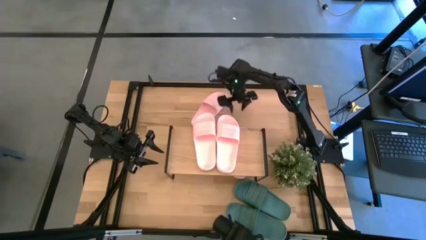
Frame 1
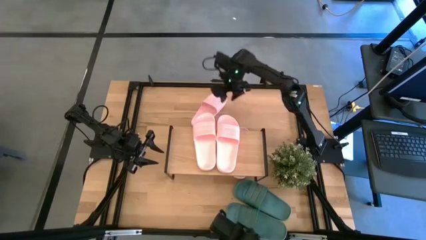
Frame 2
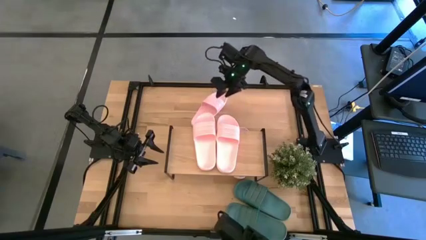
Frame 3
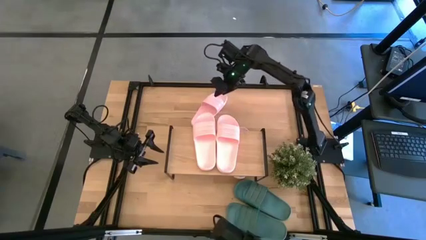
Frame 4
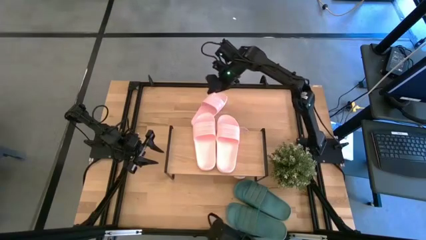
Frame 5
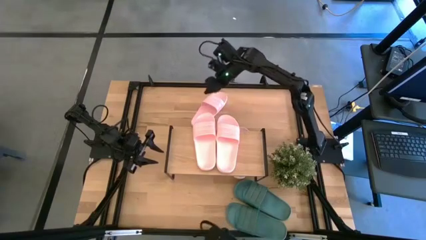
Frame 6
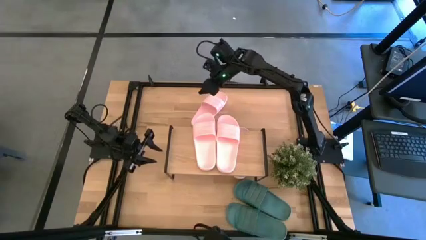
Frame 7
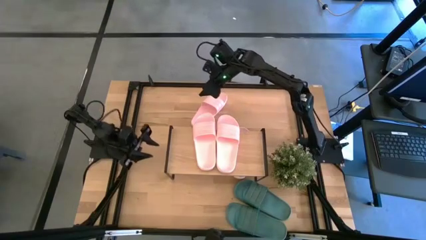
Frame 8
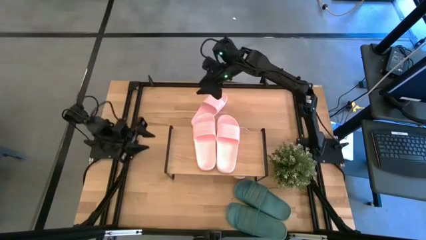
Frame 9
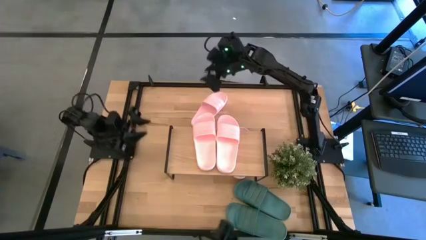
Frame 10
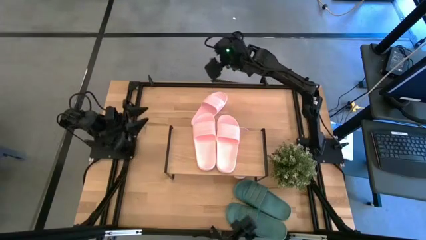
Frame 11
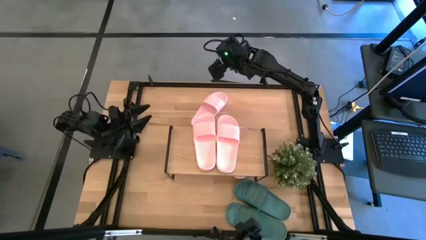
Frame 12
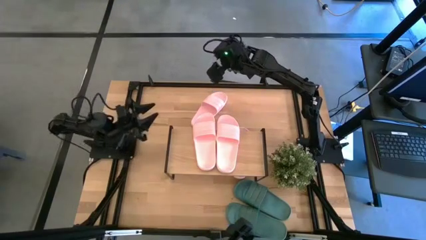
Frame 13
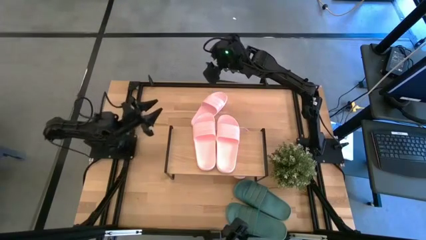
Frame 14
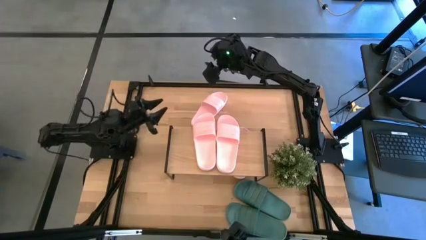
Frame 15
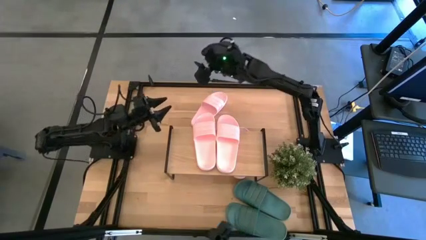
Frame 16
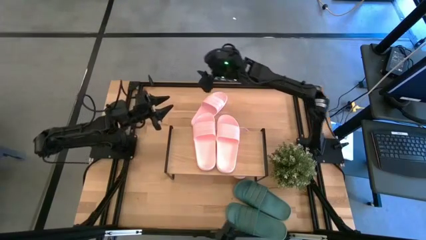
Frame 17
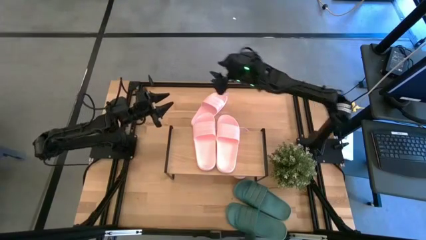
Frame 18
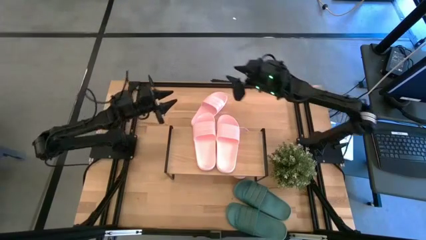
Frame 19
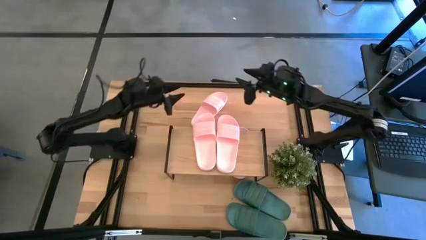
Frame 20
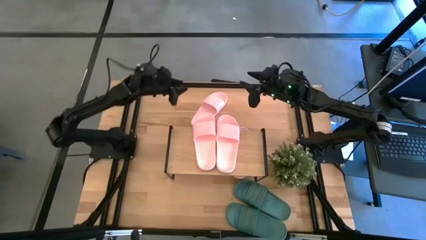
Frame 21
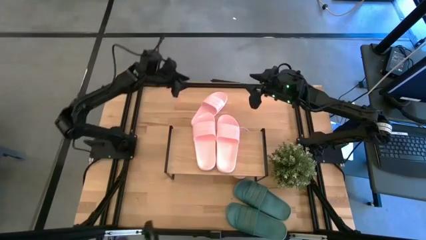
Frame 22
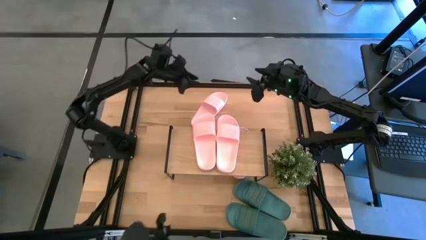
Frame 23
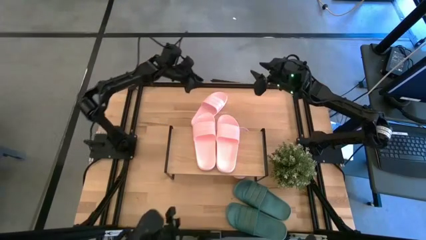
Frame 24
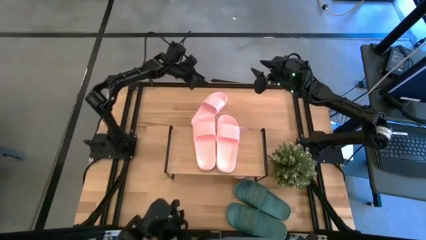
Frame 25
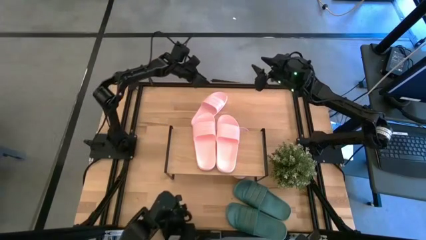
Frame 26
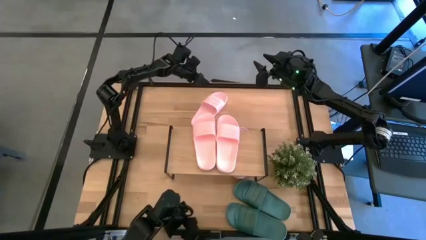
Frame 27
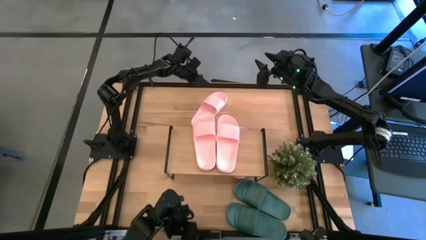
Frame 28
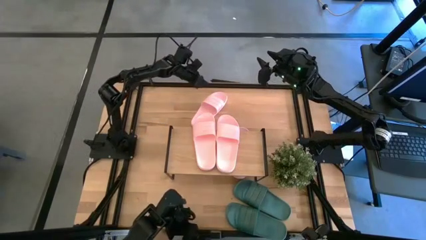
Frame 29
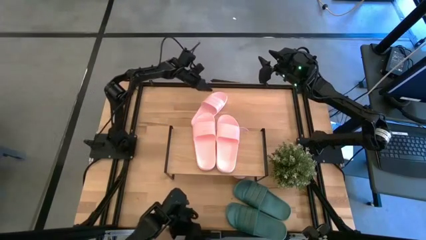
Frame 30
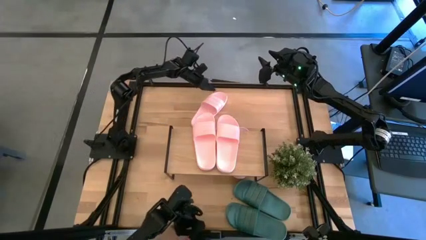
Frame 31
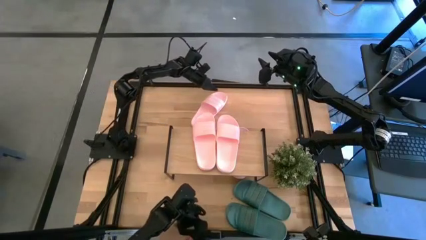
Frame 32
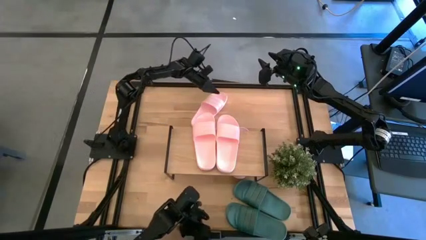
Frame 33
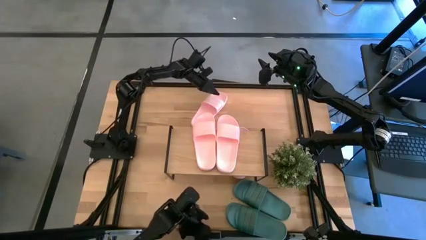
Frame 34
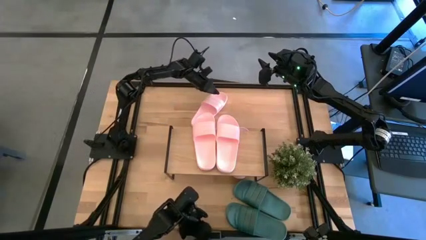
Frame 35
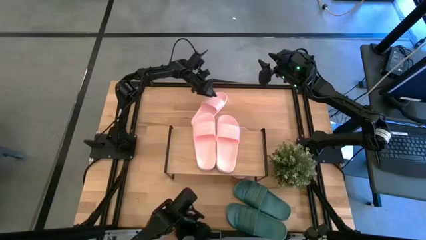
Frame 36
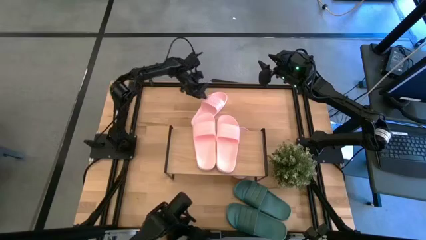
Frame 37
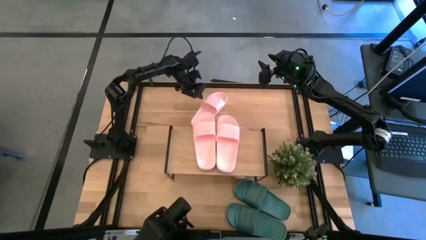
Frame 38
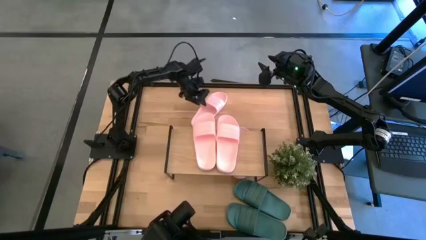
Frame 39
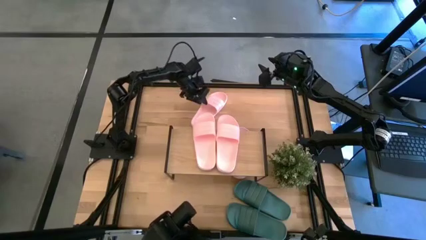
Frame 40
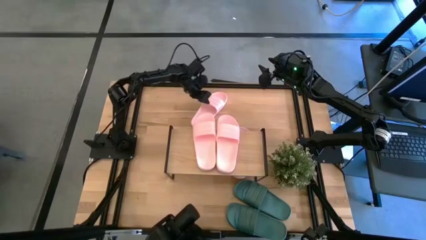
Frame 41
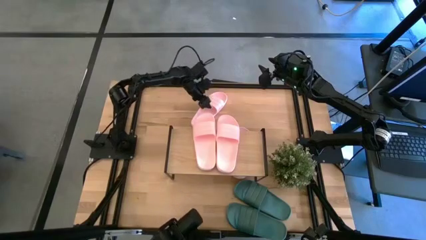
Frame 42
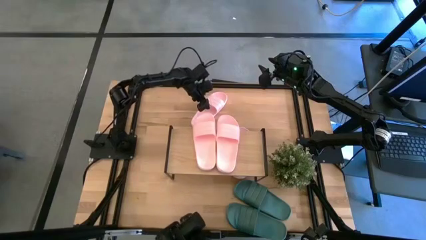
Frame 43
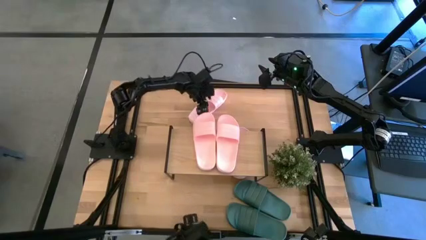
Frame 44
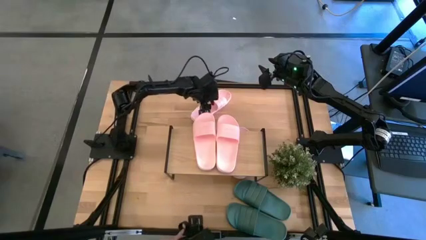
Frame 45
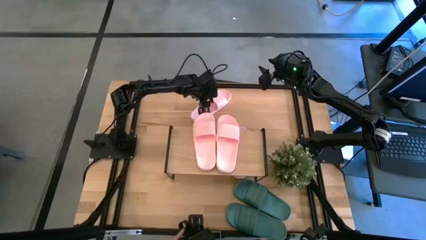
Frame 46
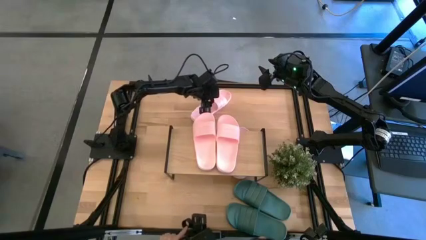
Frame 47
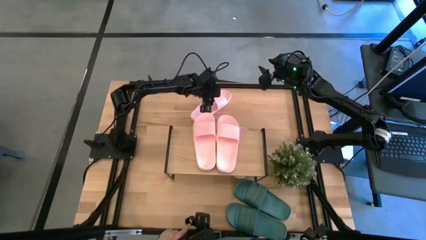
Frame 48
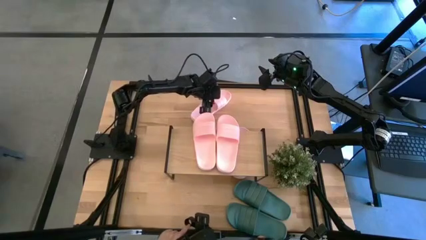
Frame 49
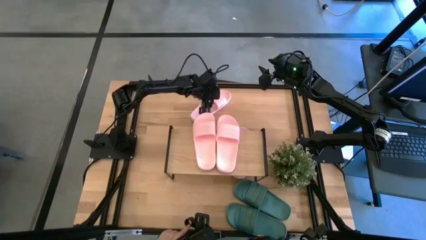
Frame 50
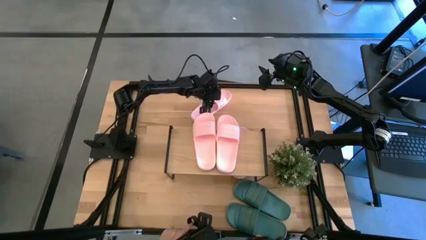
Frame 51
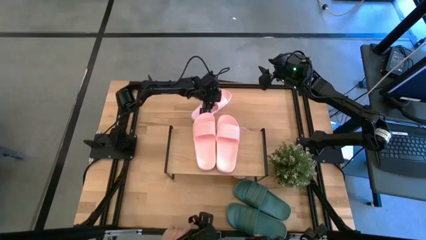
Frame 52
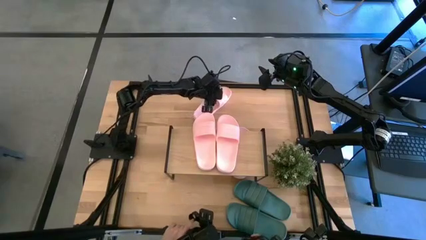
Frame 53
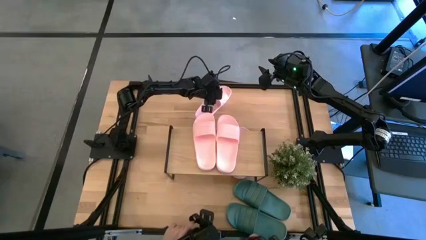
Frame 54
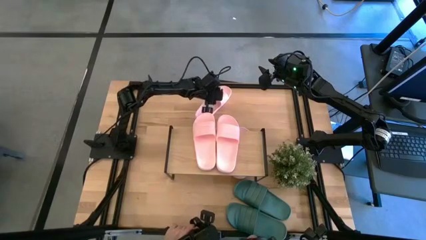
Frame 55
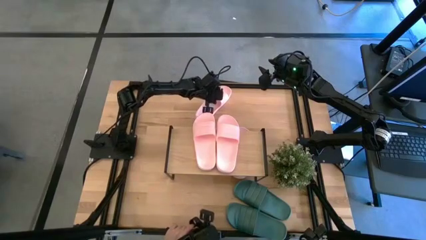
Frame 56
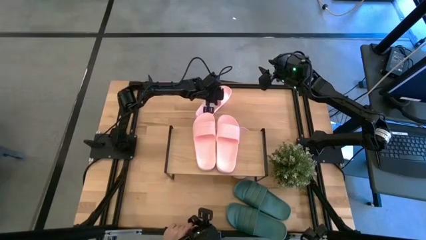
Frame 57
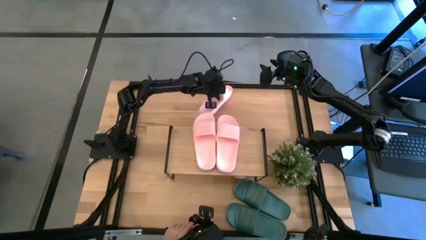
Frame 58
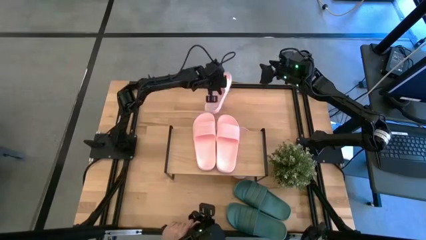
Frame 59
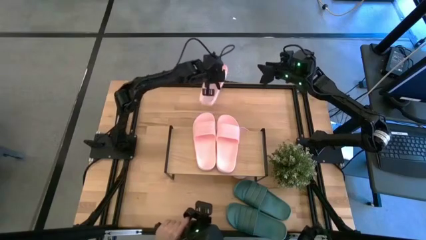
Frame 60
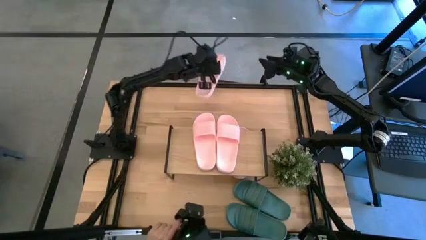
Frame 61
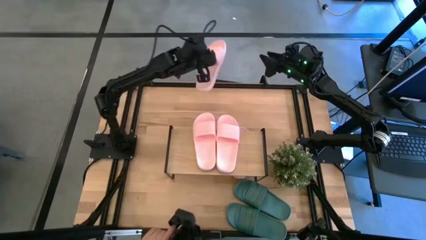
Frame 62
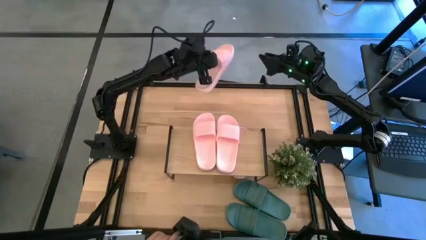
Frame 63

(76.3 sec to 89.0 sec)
Task: Pick and place slides into the shelf
Put the pink slipper under the shelf

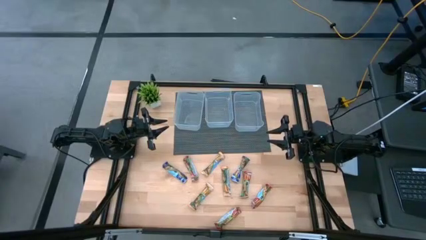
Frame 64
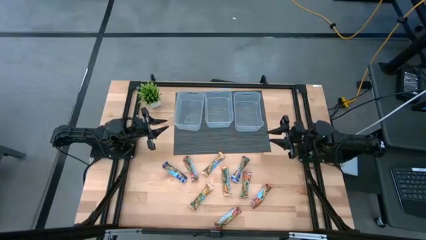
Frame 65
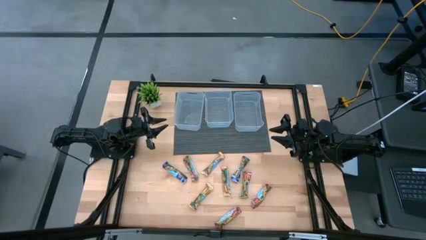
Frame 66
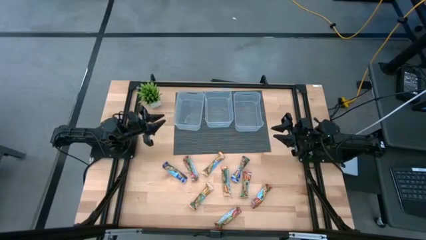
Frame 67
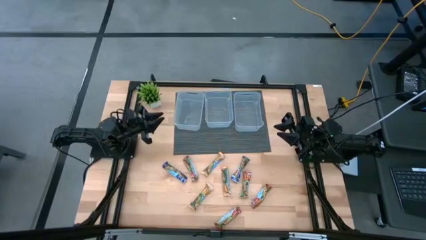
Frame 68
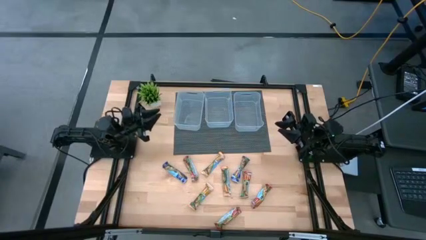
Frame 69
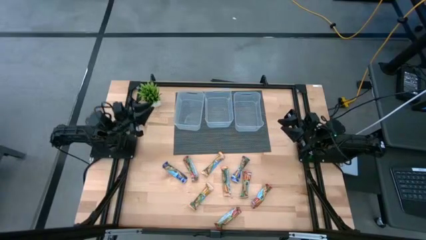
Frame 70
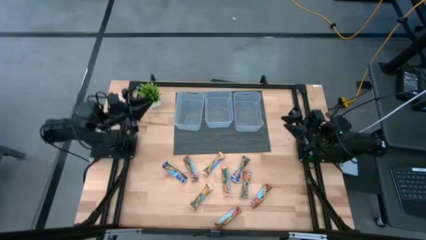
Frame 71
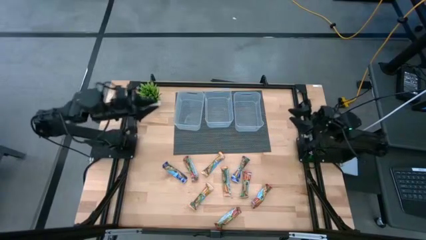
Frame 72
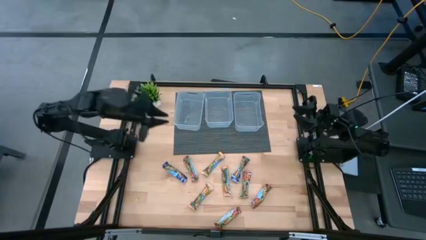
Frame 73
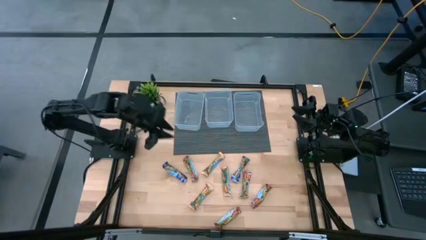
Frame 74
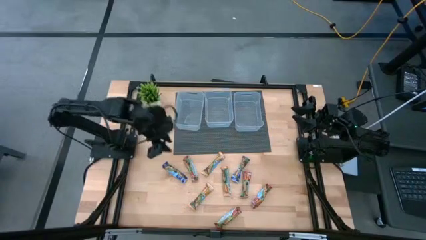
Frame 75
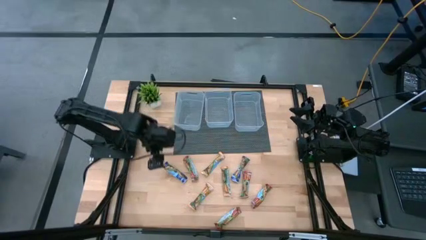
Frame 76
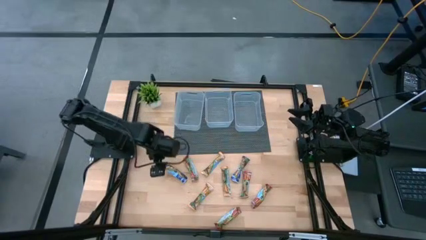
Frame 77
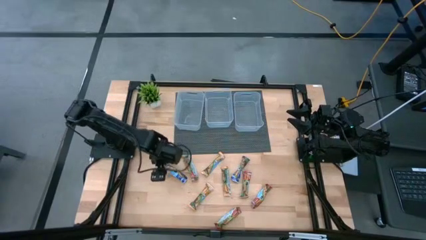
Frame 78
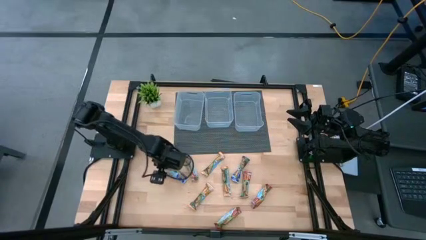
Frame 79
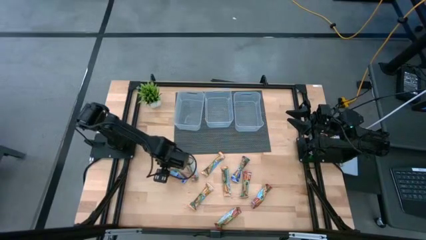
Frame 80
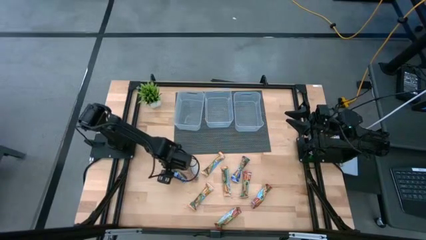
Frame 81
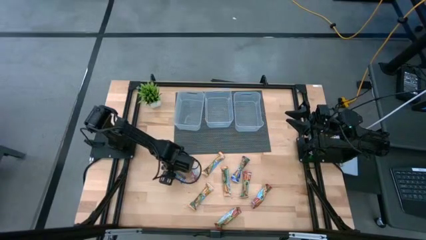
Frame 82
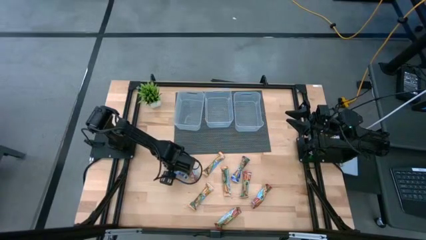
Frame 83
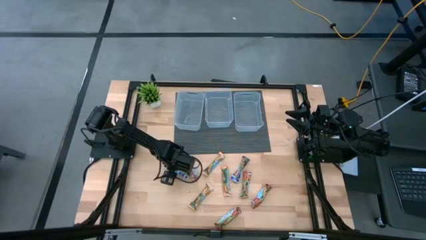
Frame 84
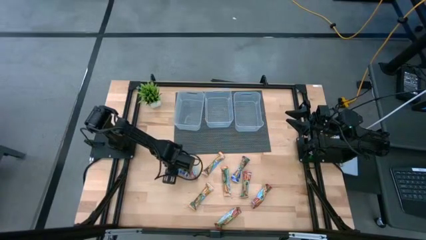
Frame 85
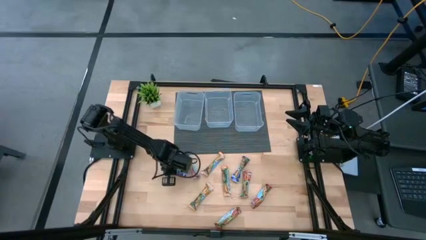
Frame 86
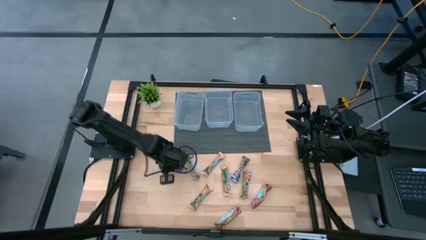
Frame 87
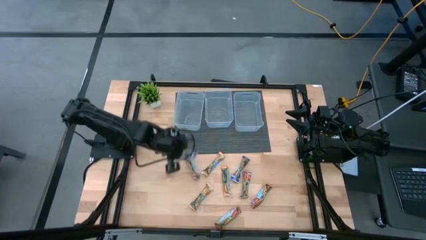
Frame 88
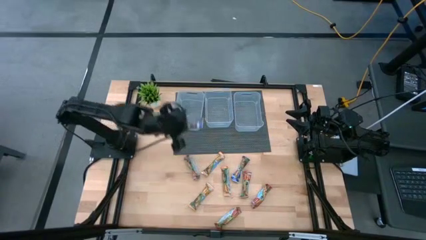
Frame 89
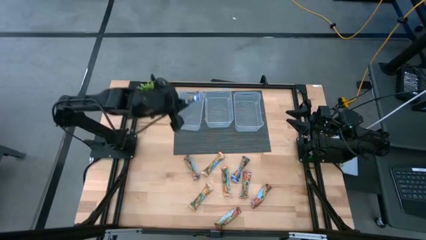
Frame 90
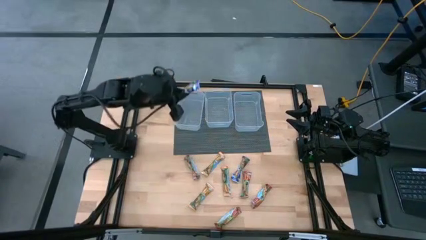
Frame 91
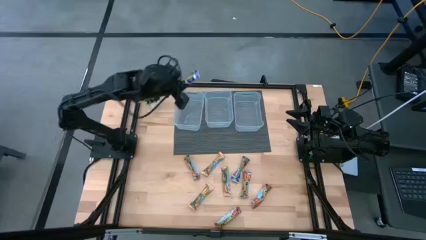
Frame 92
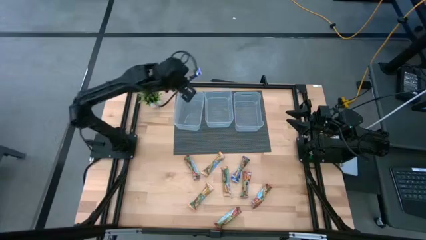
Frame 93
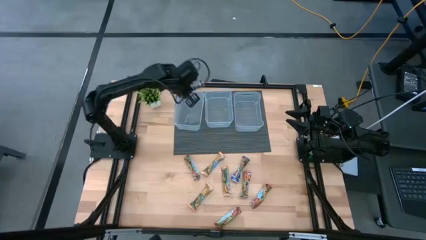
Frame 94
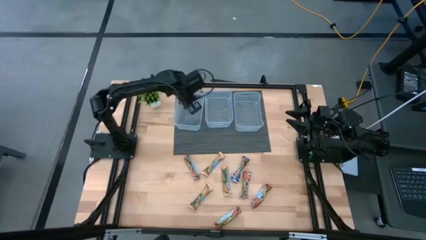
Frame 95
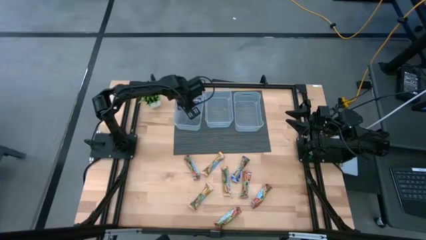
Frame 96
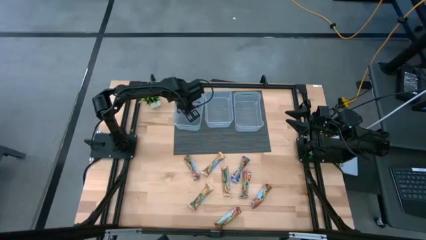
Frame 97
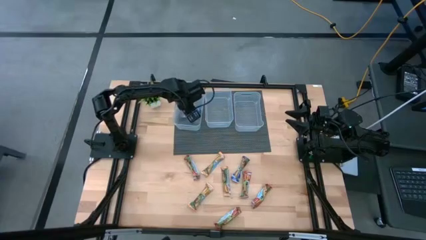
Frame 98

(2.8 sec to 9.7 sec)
Task: Pick and place Granola Bars by type
Put the blue granola bar into the left transparent bin
